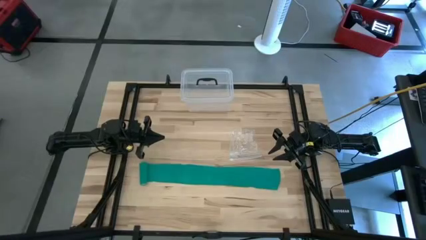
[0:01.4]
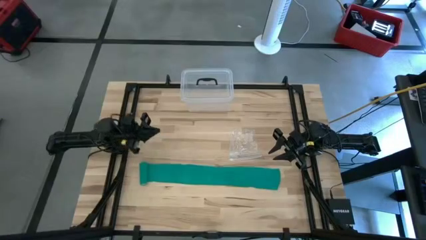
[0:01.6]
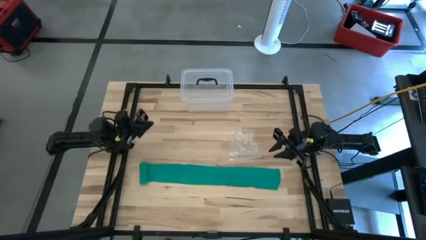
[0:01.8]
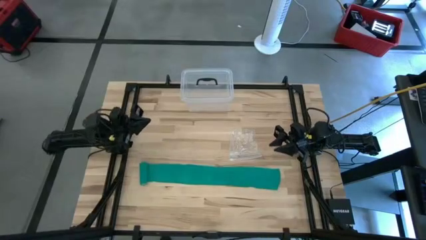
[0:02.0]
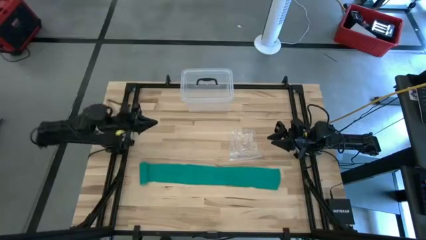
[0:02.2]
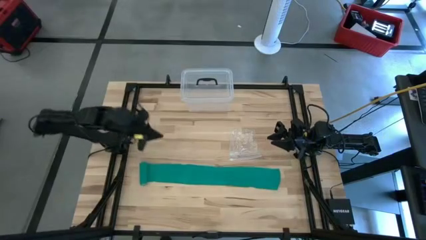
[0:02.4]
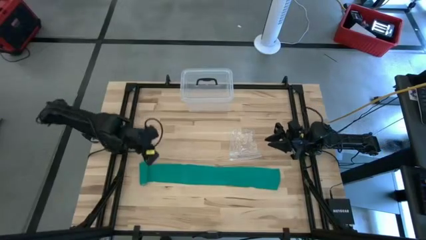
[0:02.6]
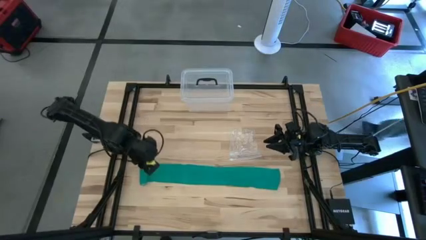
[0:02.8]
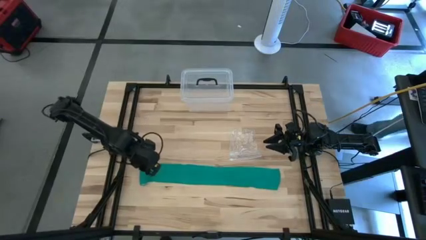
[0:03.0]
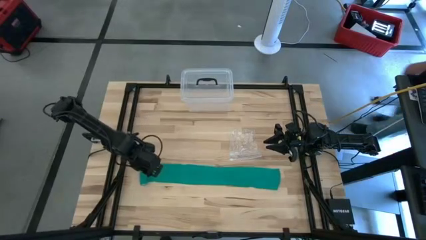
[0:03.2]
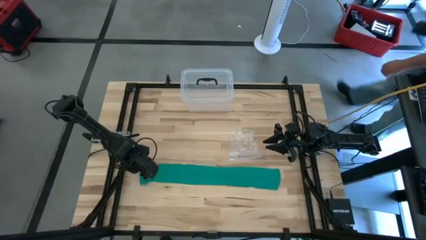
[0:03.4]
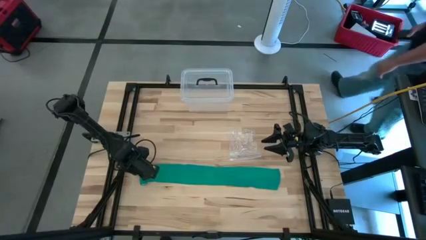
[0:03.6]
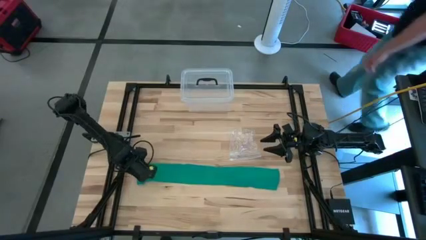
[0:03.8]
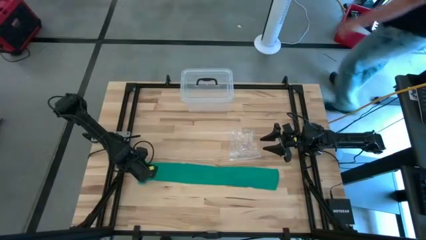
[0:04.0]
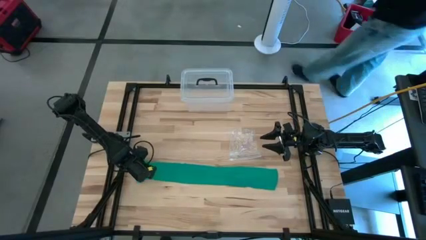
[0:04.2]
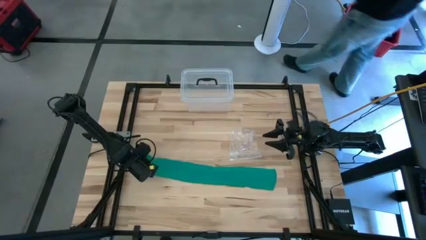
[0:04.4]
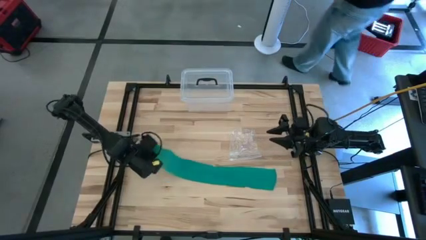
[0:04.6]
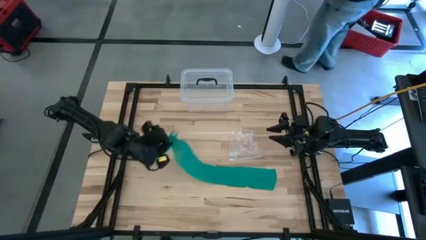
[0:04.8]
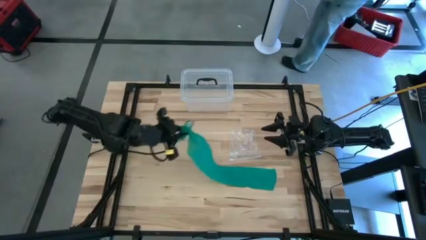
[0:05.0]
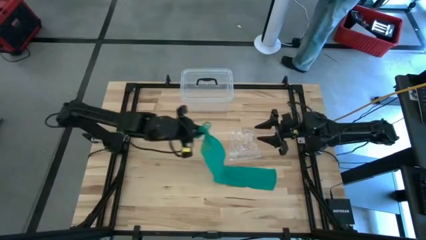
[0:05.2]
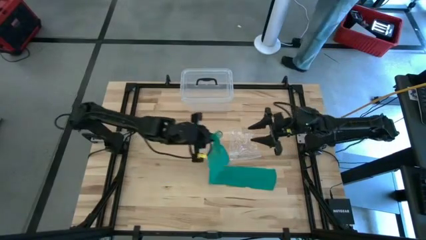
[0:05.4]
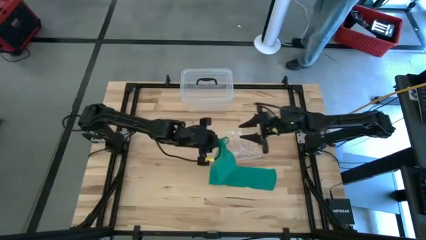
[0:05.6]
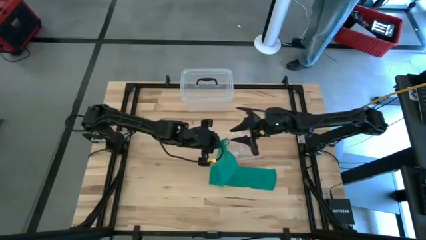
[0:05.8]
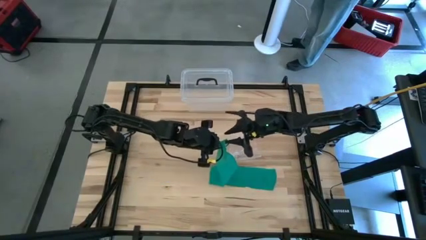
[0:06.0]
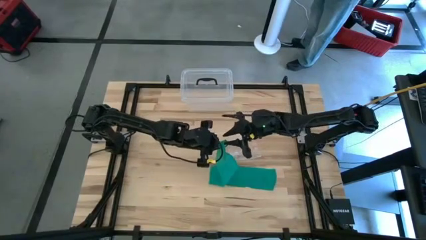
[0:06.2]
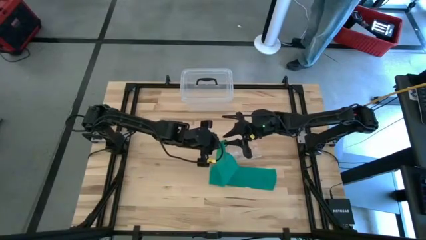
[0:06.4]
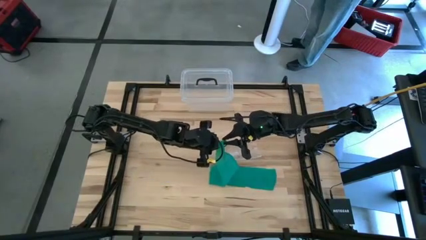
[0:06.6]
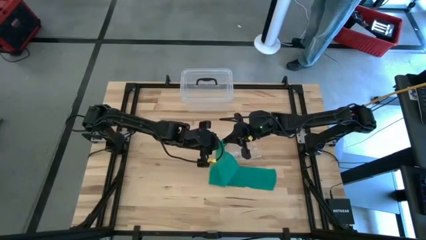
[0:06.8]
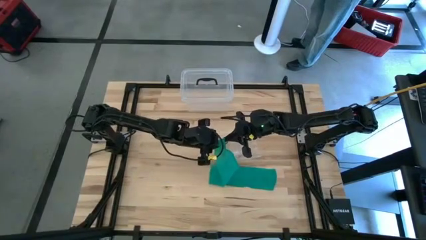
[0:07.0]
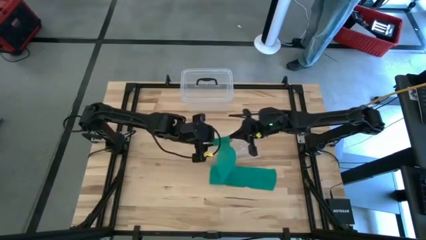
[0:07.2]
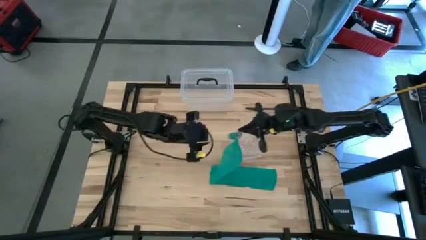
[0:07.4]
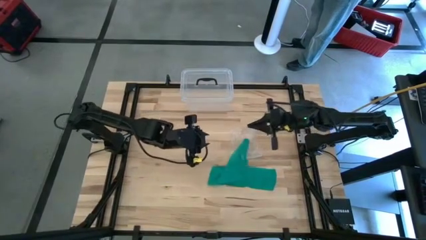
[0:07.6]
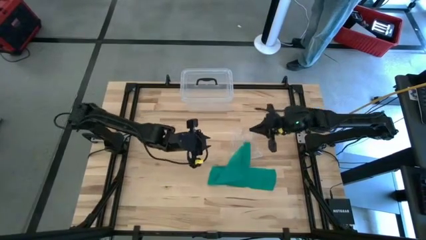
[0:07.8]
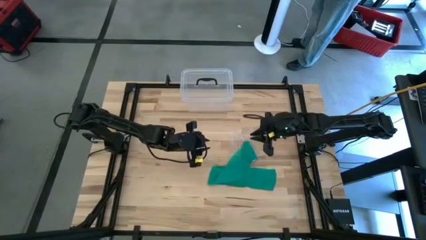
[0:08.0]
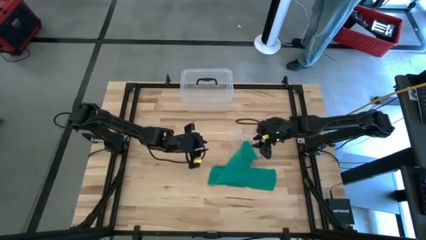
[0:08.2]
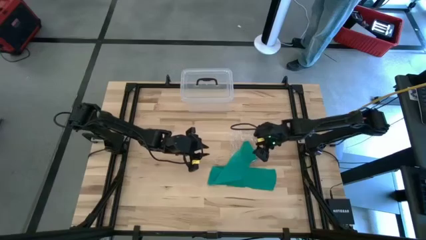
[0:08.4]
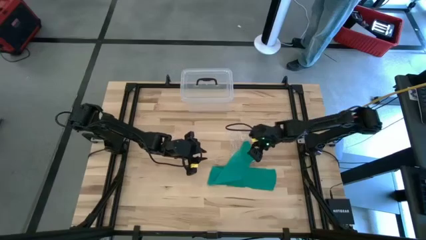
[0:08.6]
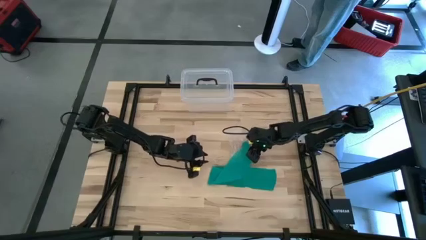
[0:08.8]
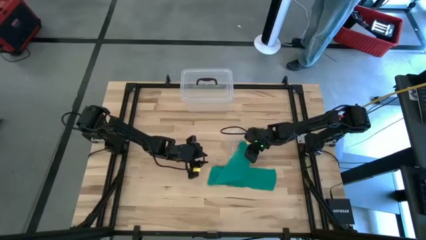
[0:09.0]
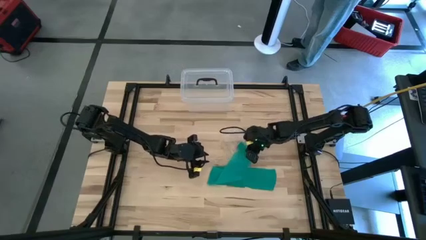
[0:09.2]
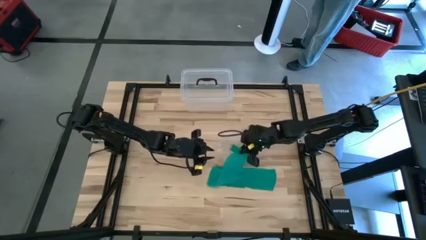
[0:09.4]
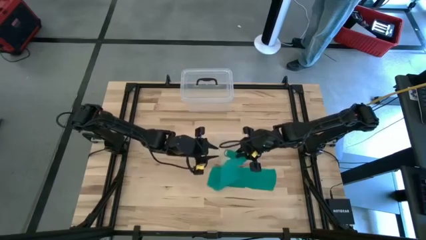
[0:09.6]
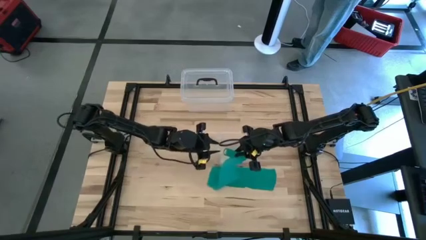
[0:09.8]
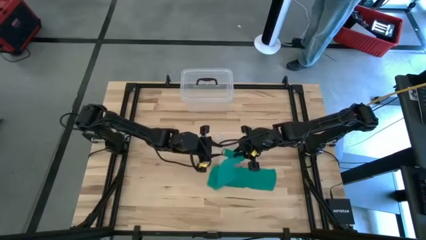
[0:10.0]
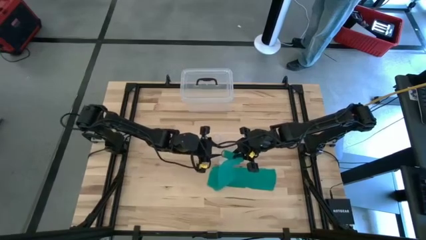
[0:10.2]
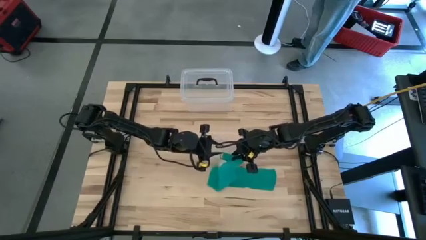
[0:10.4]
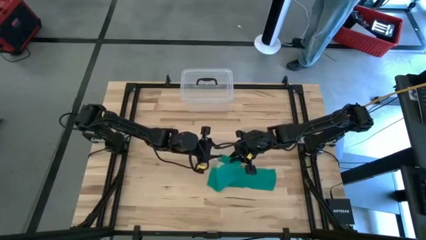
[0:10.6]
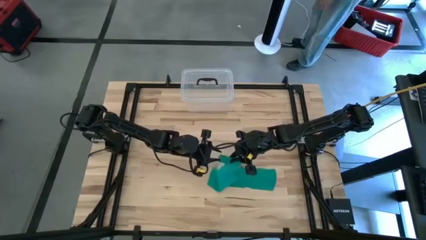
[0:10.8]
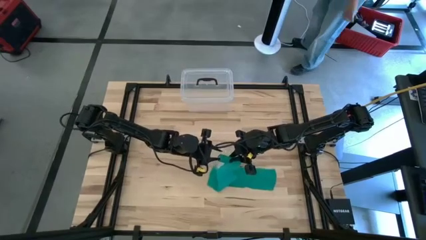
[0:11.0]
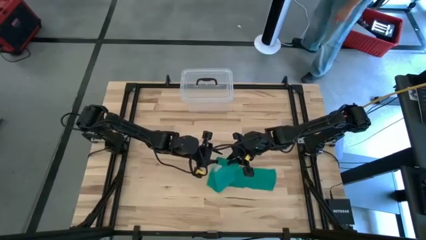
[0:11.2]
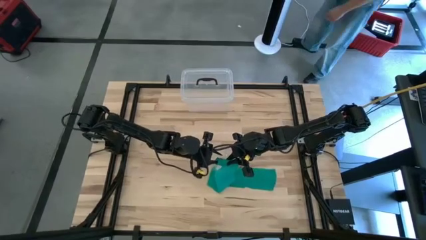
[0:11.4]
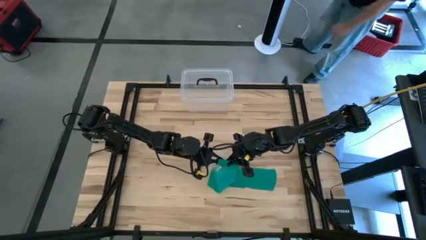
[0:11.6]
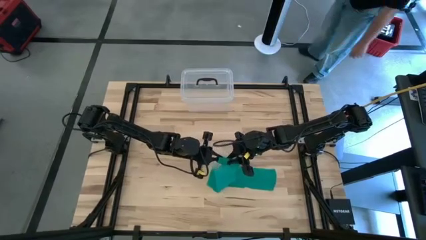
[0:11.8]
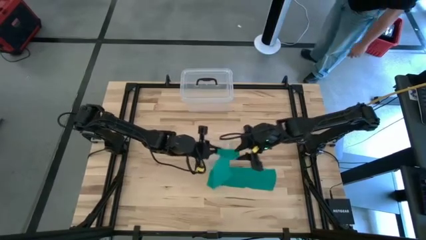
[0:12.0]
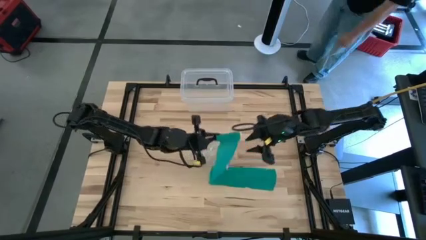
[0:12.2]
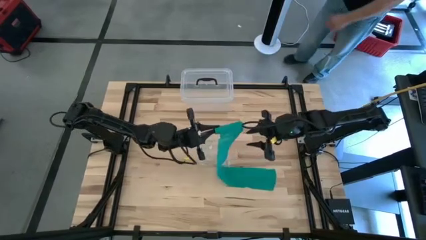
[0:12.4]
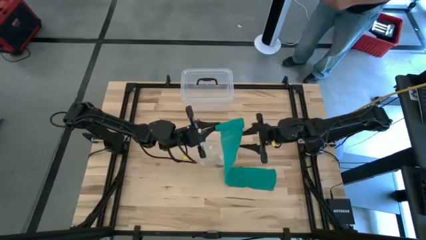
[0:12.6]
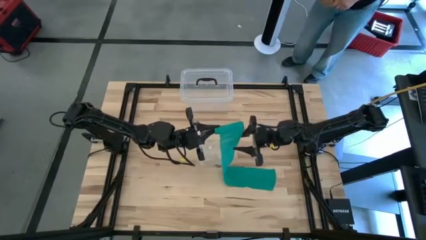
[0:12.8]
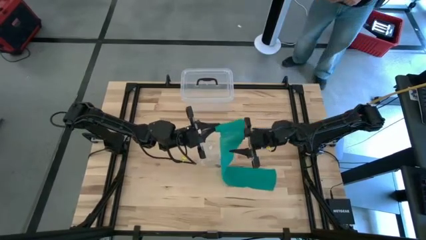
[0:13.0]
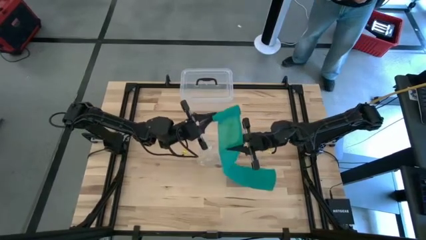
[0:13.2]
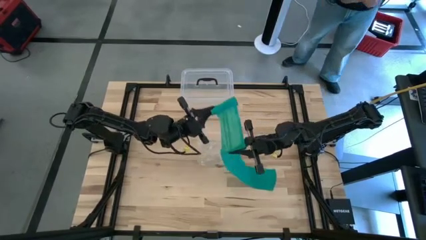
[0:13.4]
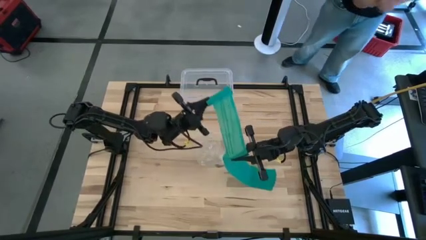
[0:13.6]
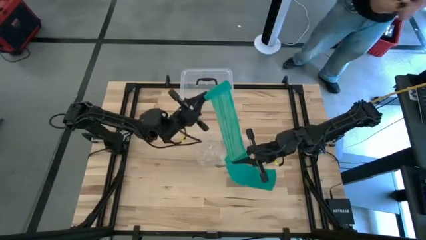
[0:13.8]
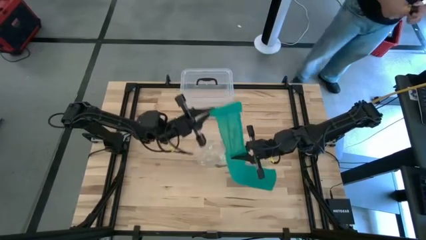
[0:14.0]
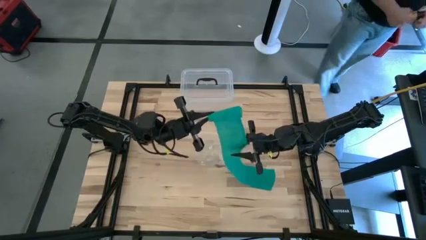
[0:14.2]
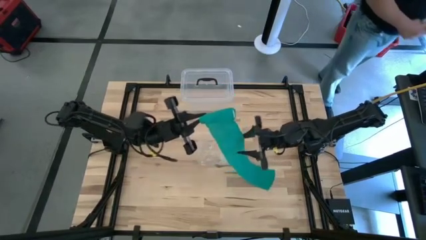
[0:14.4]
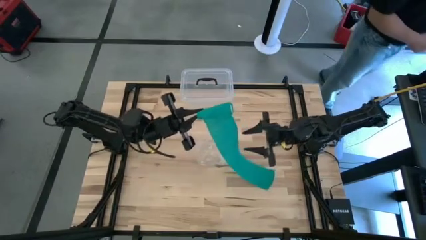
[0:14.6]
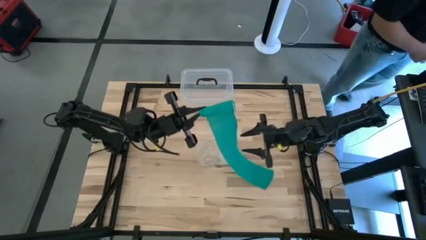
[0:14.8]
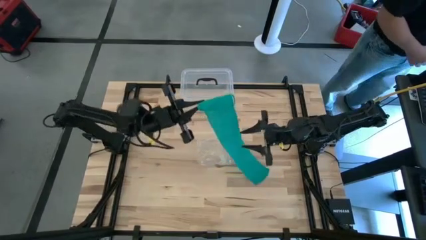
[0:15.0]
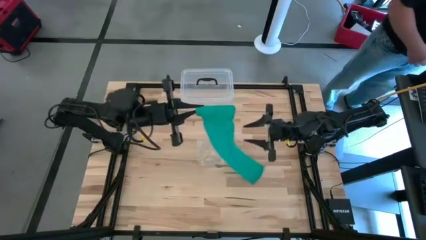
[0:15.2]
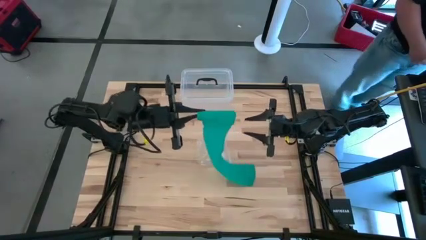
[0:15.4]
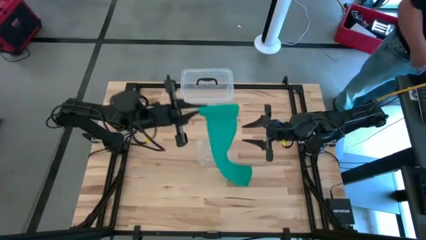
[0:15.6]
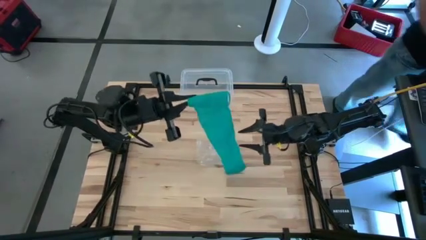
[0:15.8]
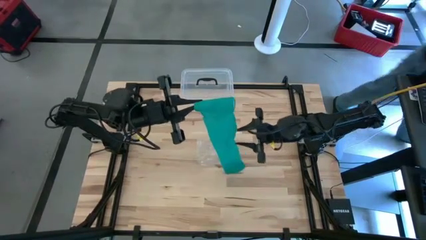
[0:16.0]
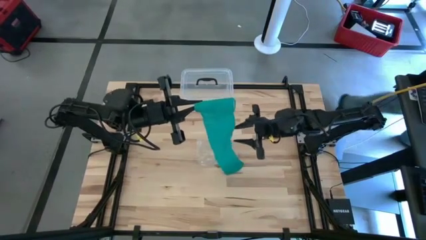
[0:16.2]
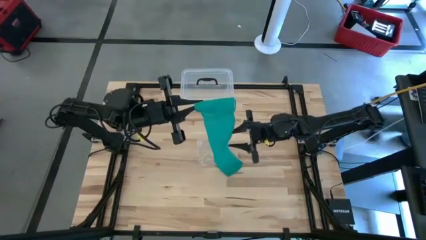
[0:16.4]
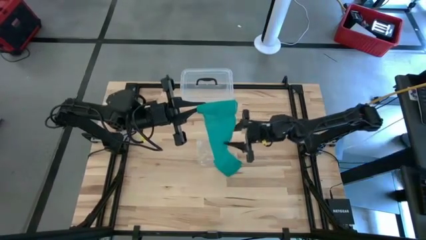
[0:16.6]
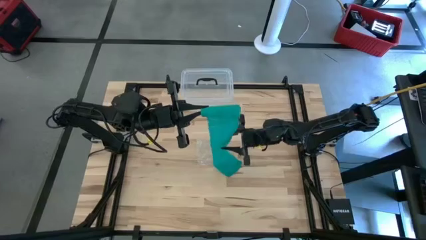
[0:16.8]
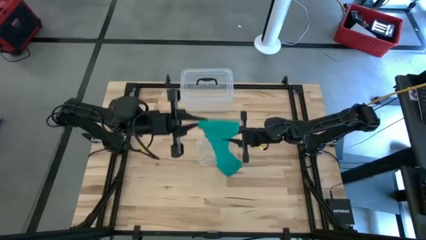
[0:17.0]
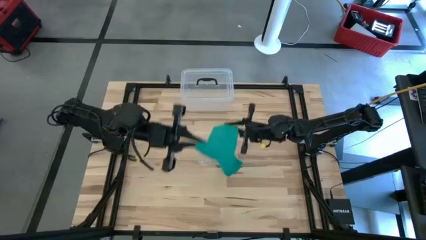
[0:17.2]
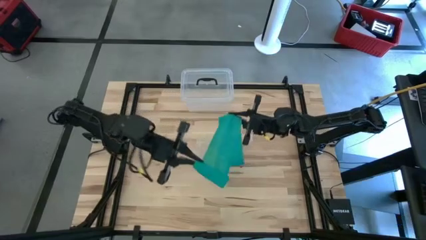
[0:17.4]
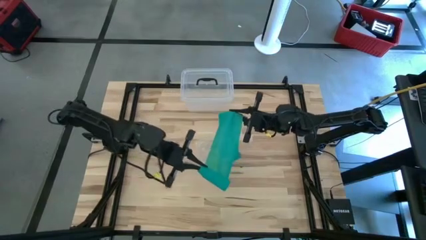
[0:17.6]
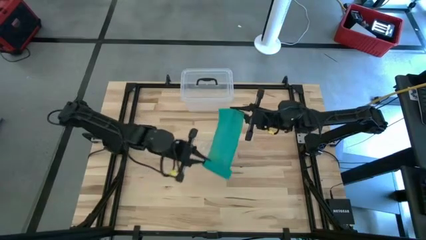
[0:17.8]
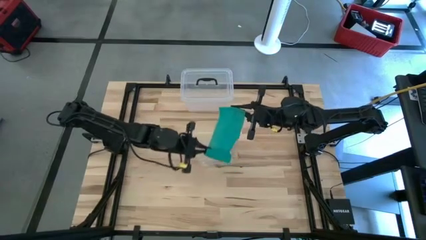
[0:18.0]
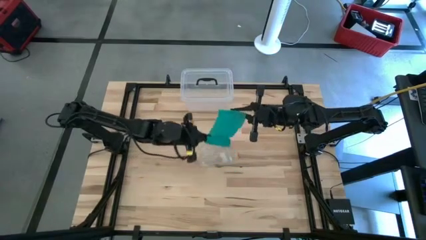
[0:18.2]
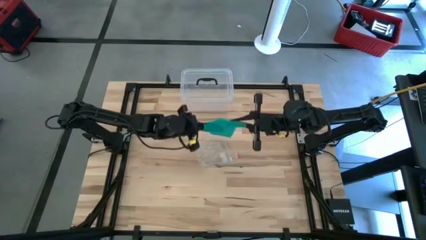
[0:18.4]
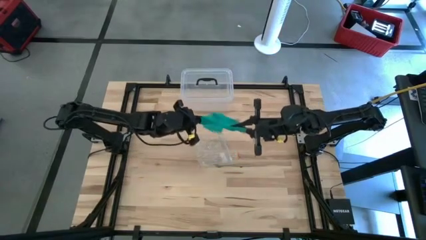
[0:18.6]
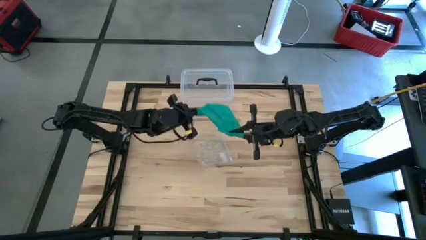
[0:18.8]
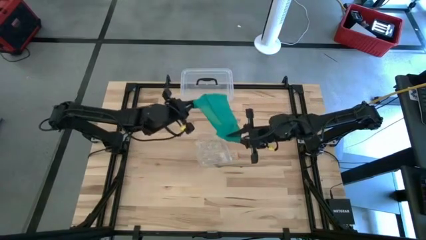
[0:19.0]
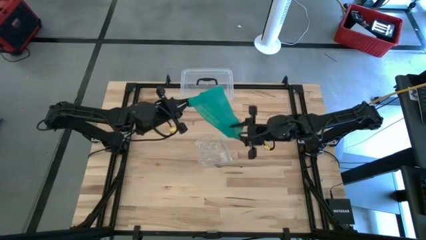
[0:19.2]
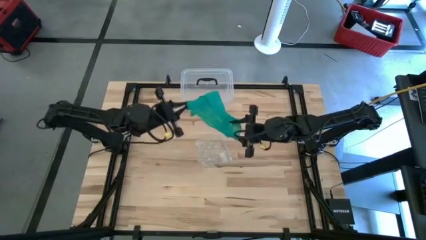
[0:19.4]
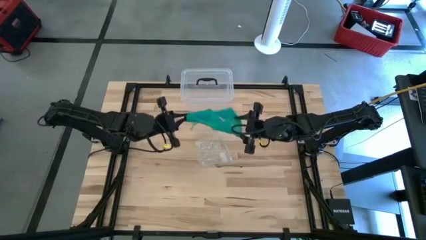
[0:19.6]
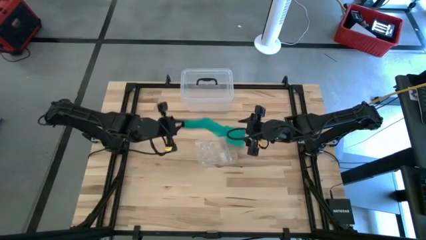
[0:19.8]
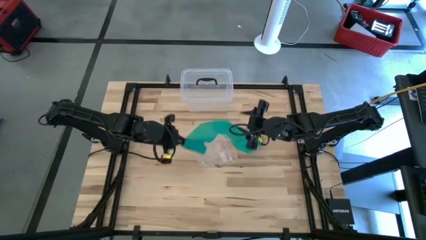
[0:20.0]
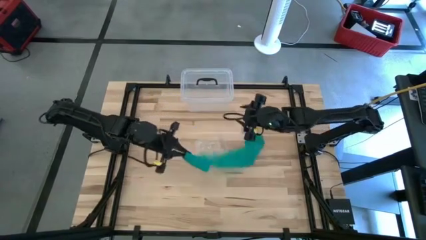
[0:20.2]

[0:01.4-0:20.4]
Task: Roll bandage
Roll the green bandage
